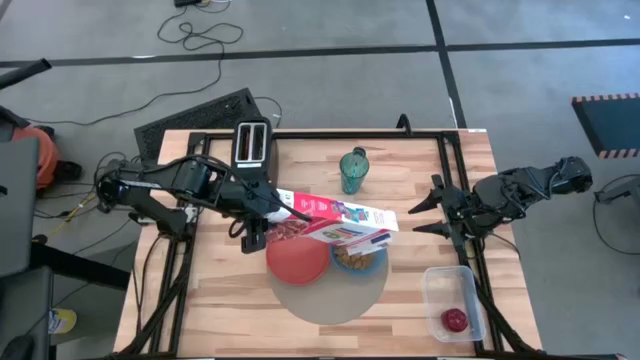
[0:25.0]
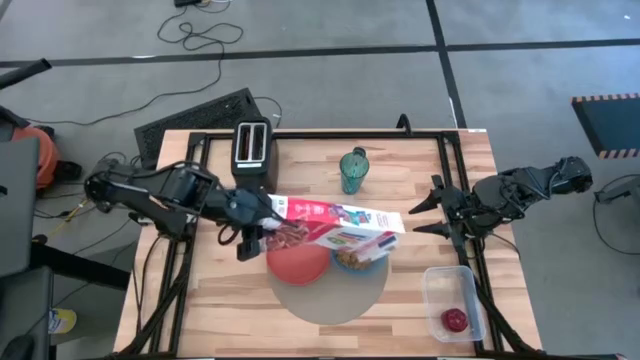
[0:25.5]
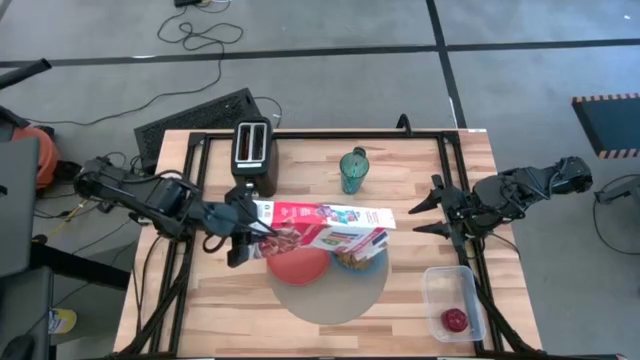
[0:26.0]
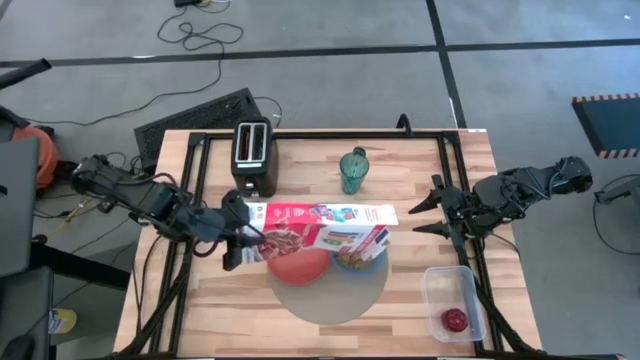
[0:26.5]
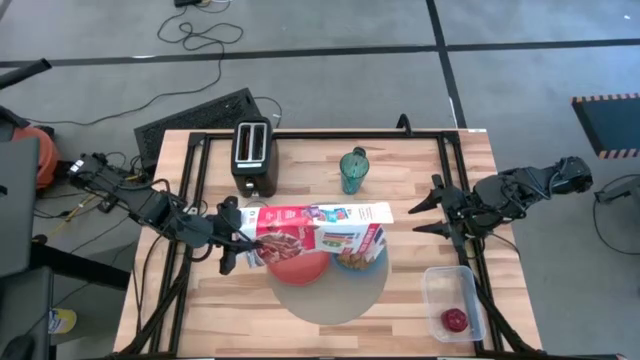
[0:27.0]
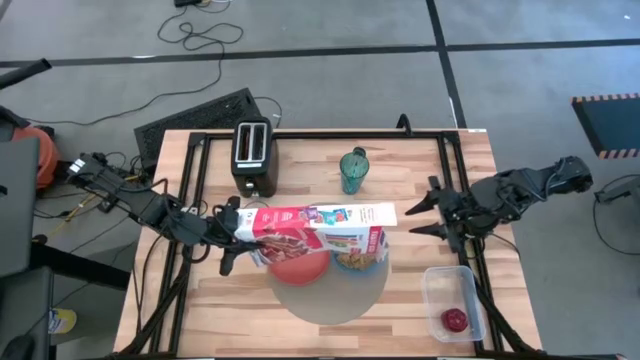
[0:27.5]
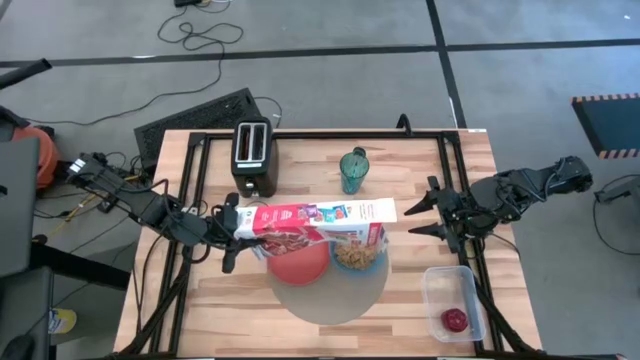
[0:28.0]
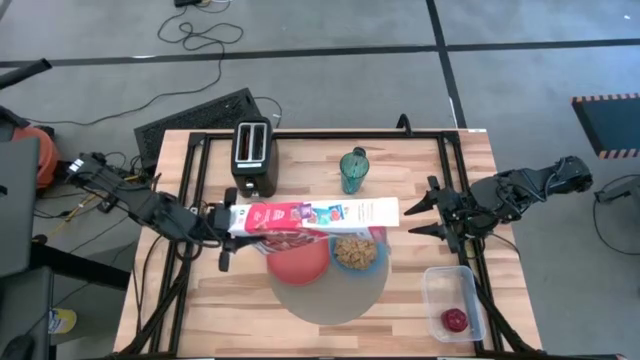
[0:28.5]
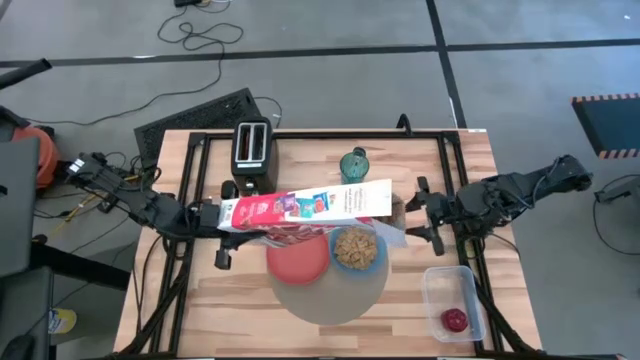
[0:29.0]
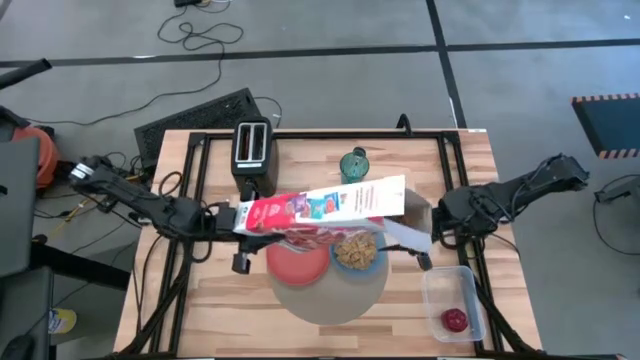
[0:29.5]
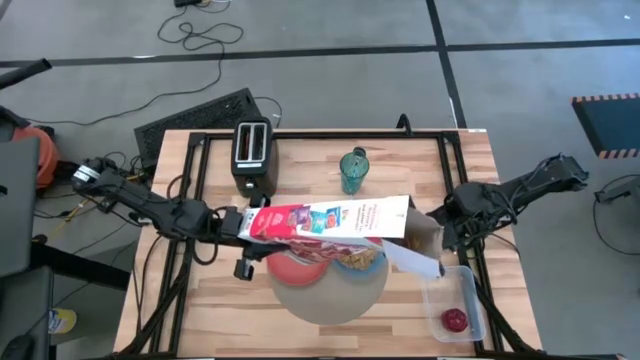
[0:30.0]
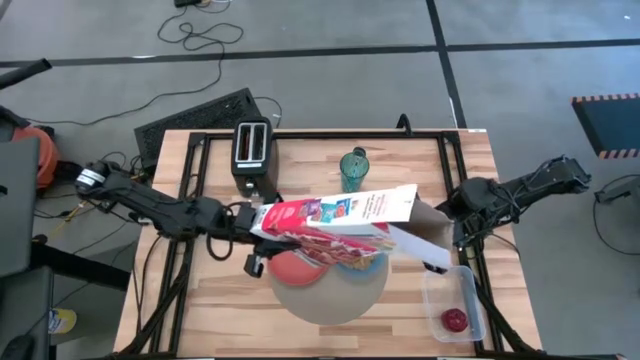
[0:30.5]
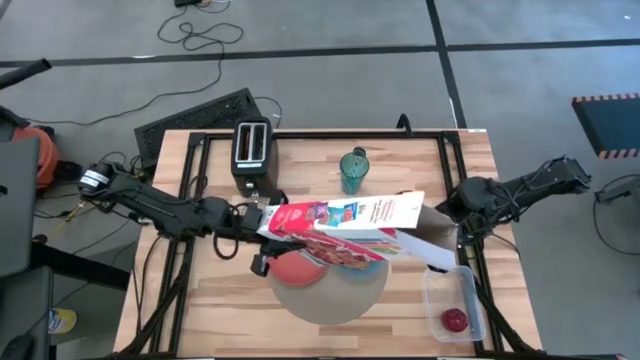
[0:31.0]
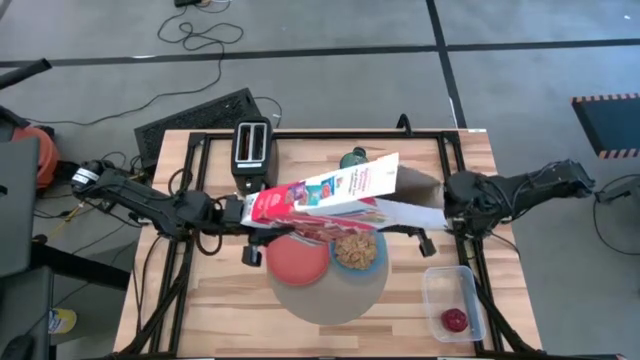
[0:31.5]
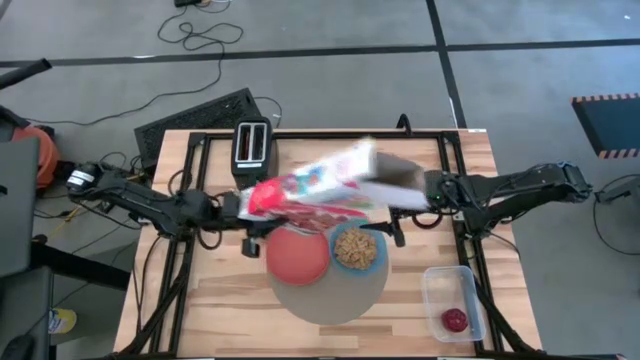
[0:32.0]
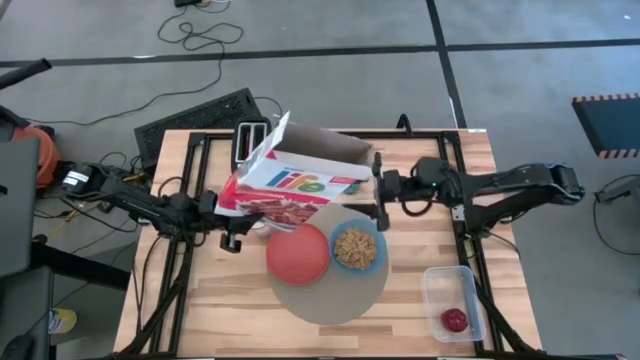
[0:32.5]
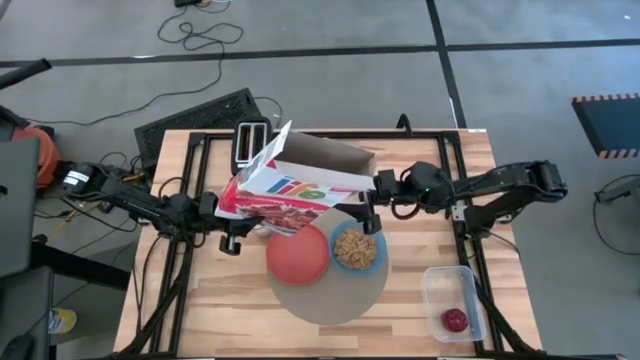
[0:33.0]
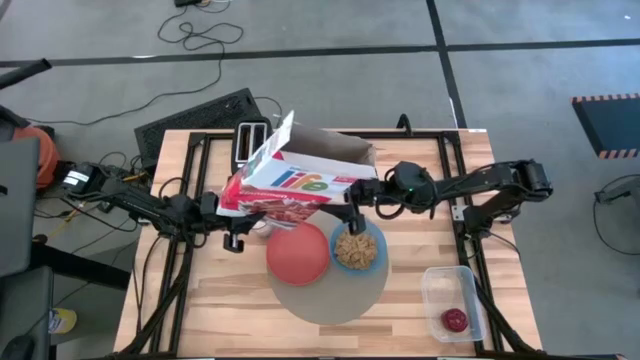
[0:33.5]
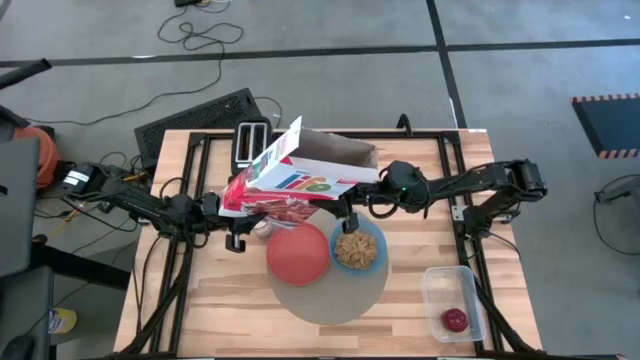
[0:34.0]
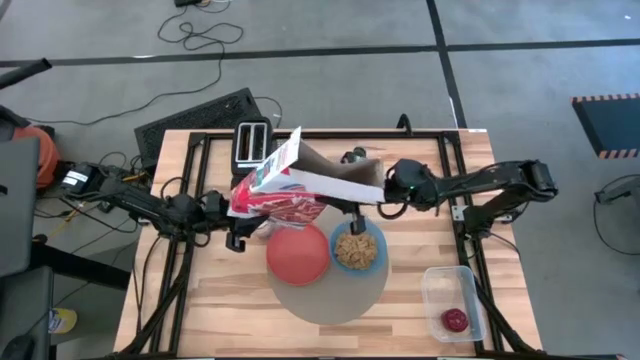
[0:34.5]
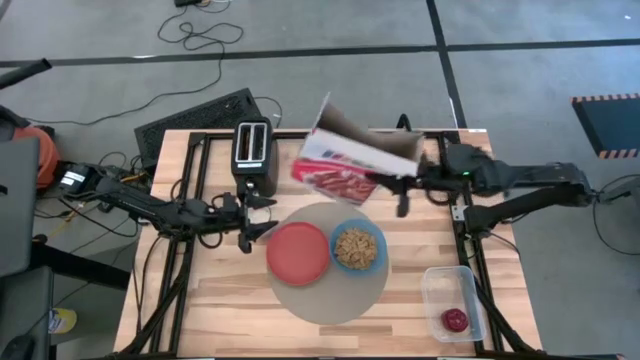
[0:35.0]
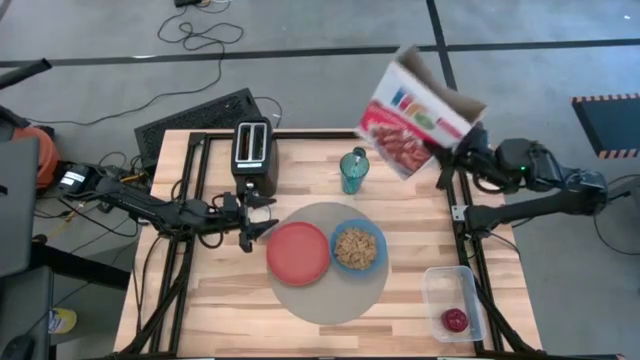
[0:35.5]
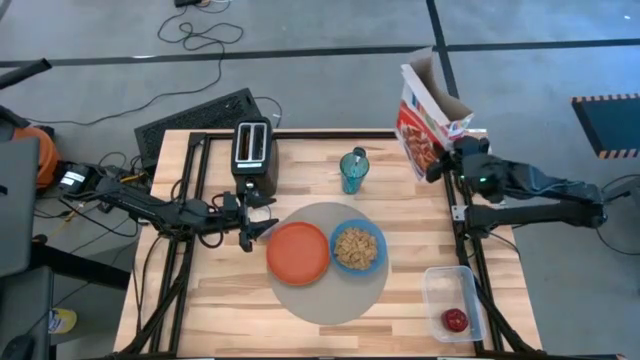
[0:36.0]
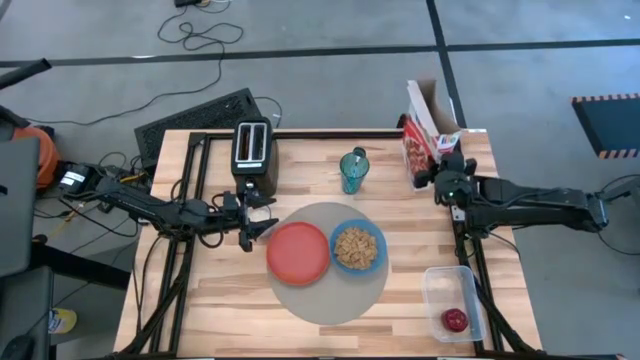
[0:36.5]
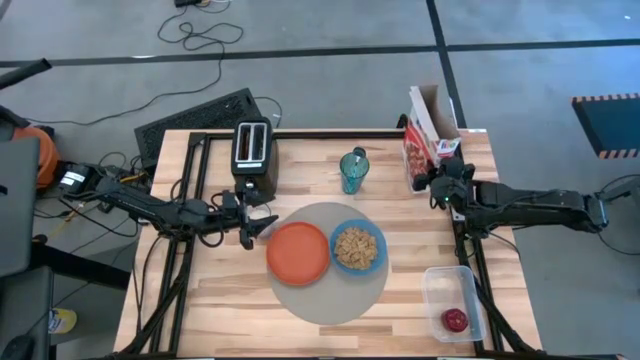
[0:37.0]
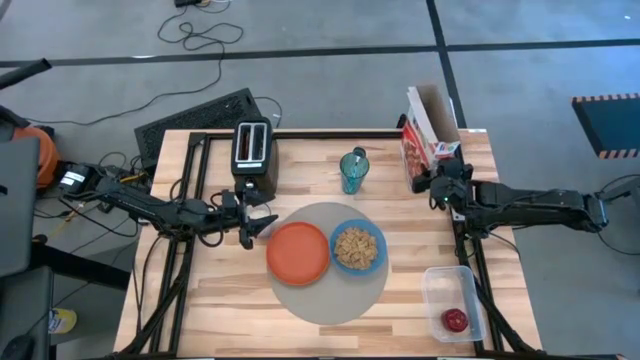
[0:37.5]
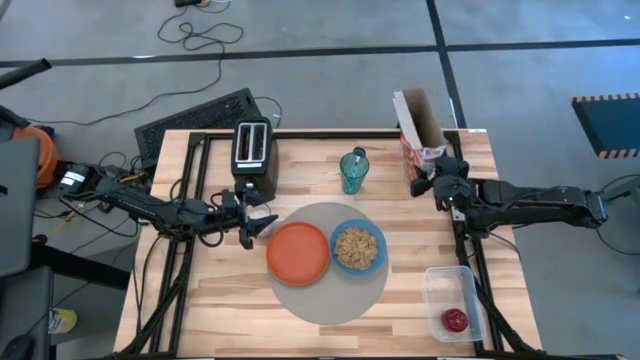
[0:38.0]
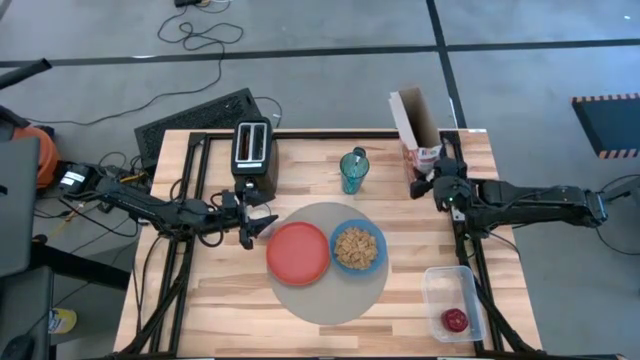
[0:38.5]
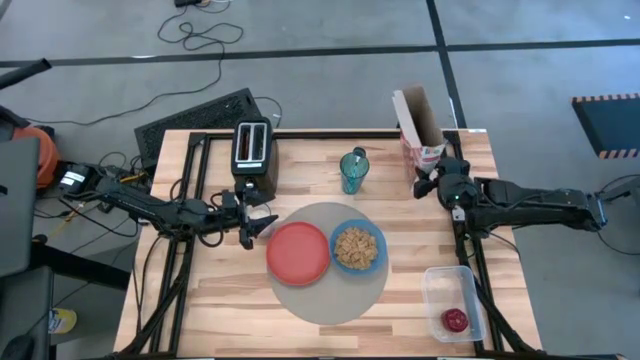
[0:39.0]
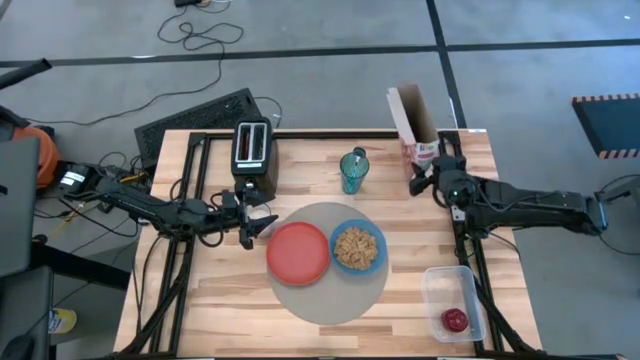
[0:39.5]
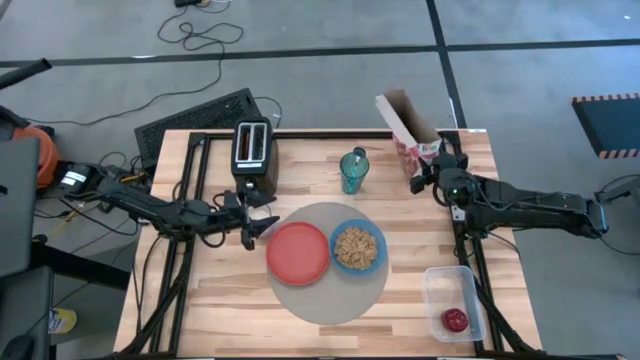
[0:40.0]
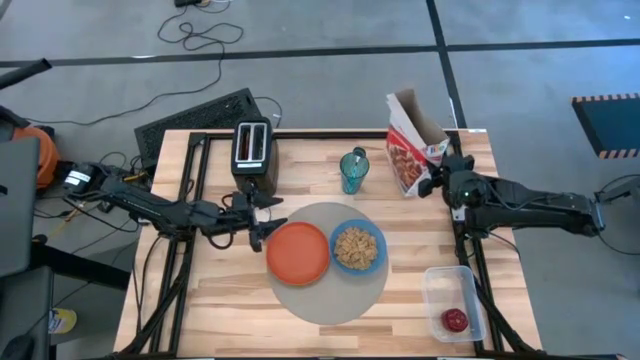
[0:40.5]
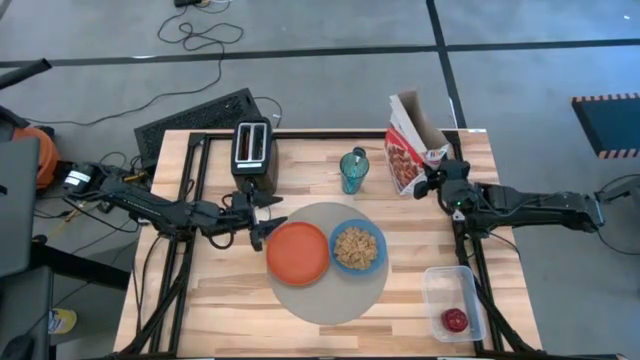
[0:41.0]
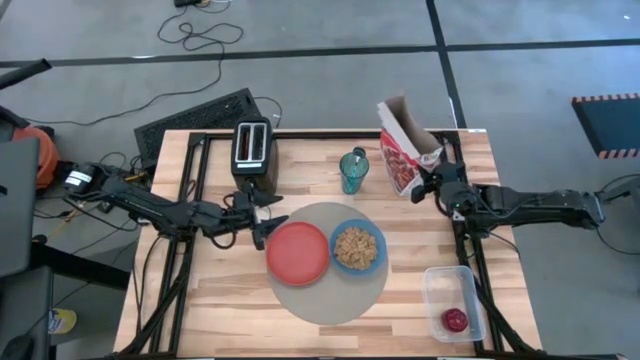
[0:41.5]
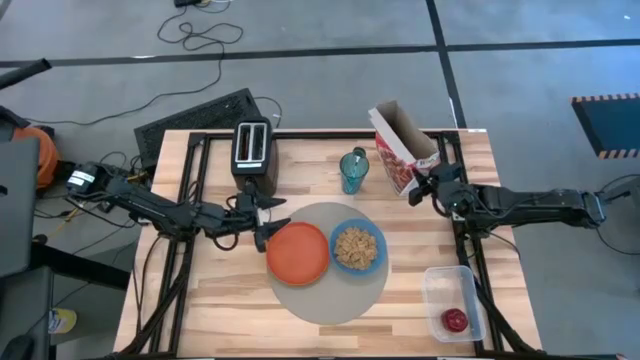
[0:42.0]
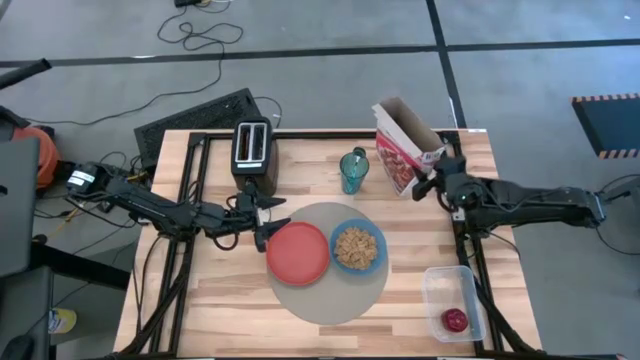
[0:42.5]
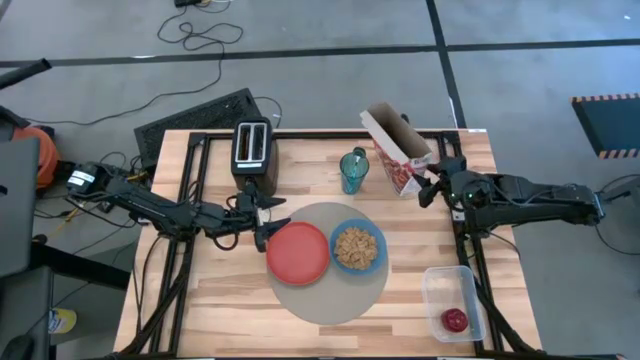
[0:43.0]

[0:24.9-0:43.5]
Task: Arrange a breakfast setting
Pour the cereal from the cereal box into the bowl

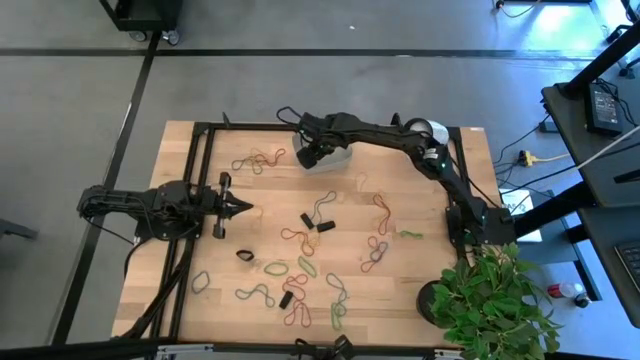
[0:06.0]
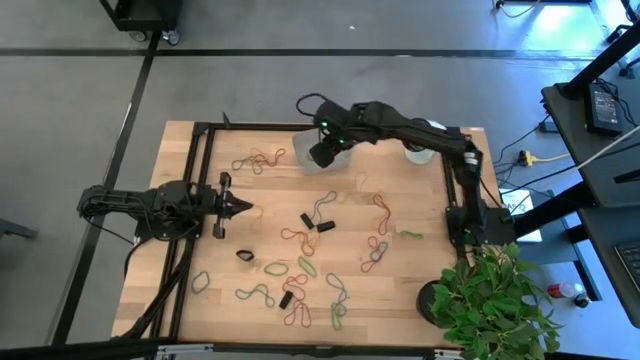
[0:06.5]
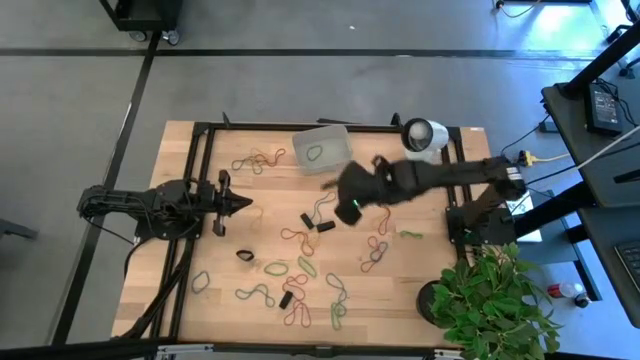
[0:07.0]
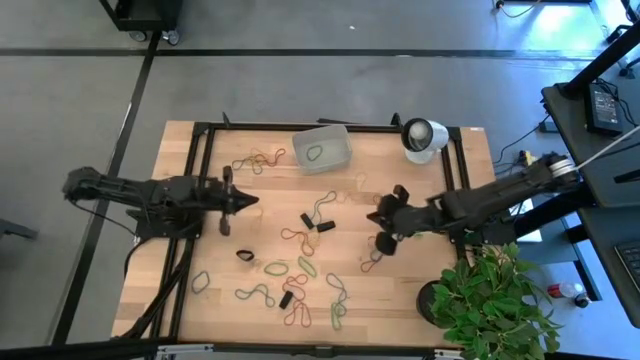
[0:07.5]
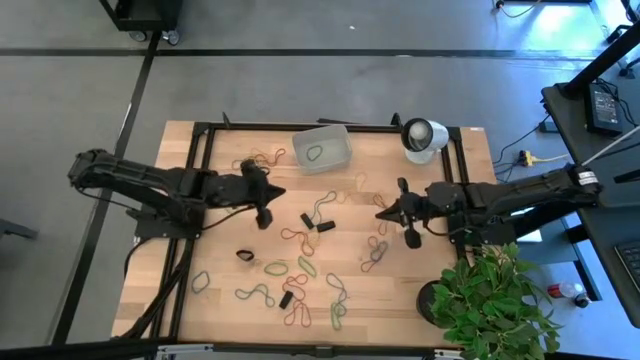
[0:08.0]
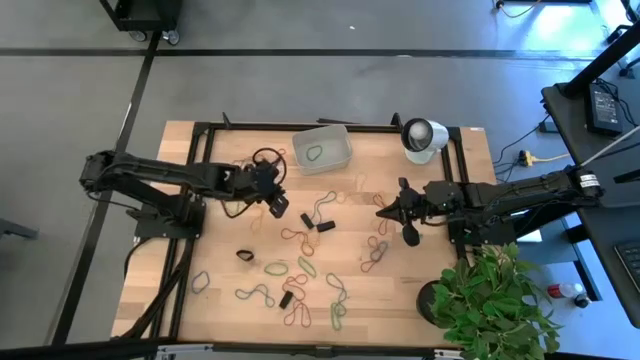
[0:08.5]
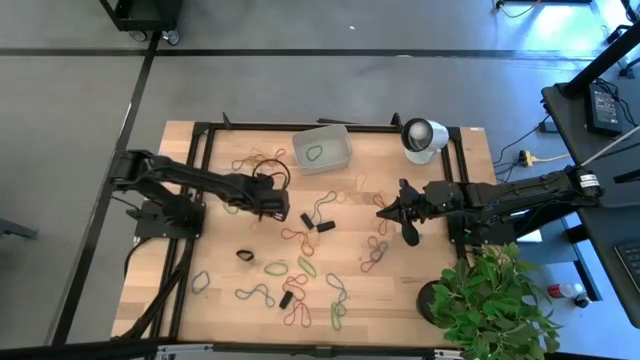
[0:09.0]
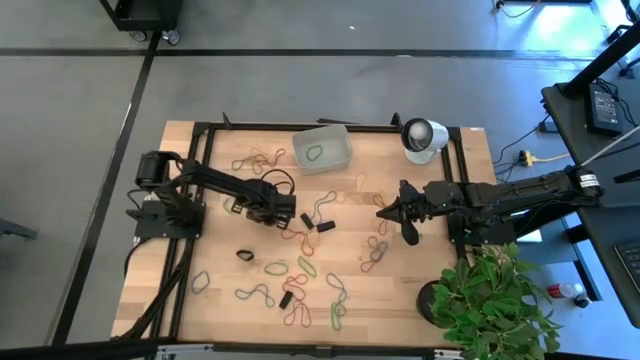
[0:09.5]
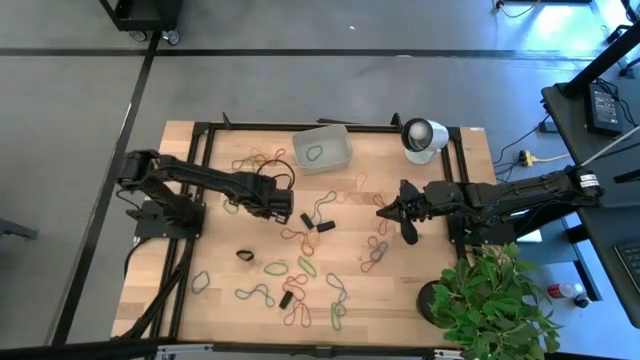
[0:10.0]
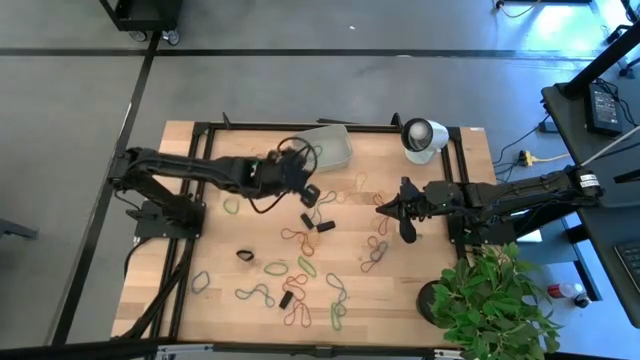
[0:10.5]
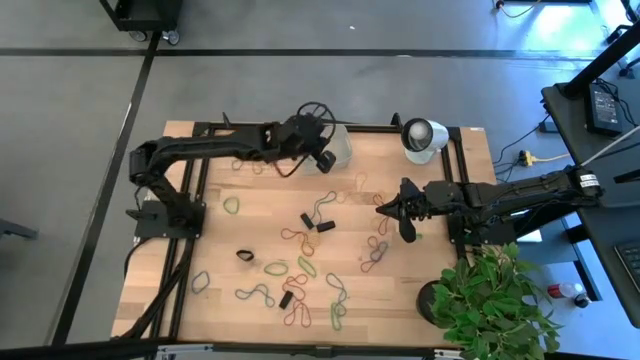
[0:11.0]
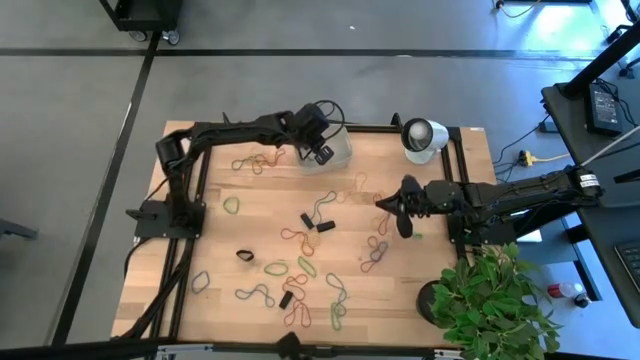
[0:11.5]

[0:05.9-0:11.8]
Task: Pick and place rubber bands into bin
Put the yellow rubber band into the gray bin
